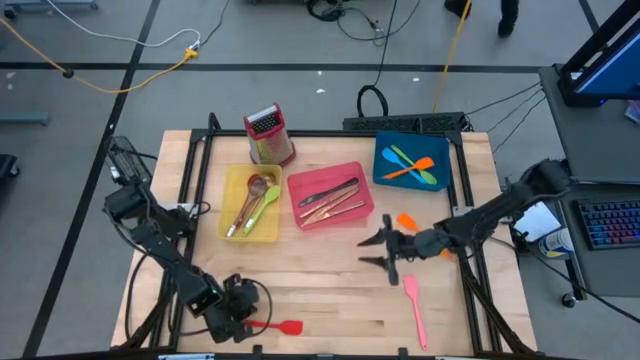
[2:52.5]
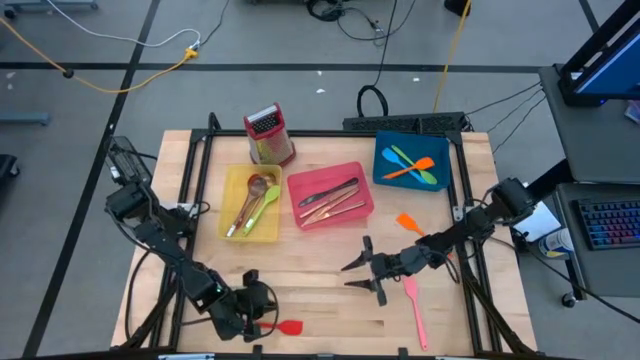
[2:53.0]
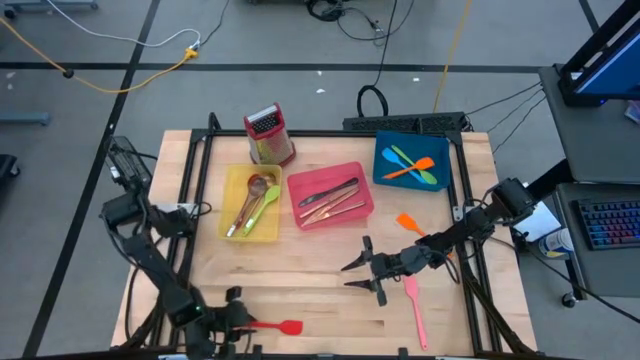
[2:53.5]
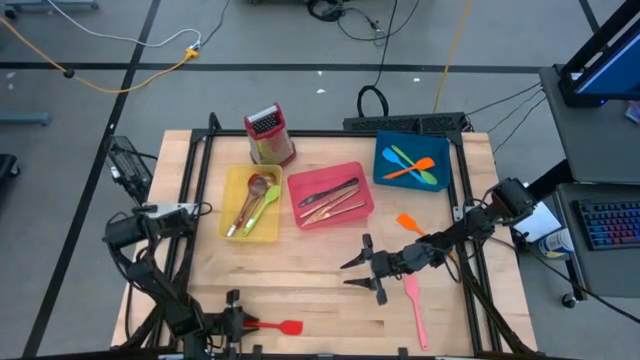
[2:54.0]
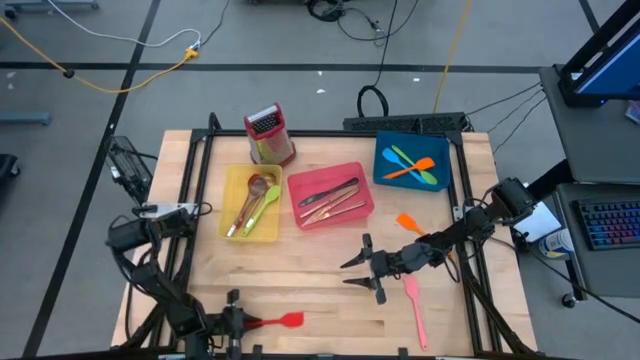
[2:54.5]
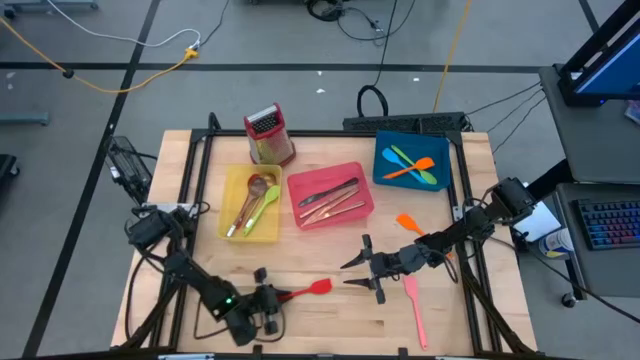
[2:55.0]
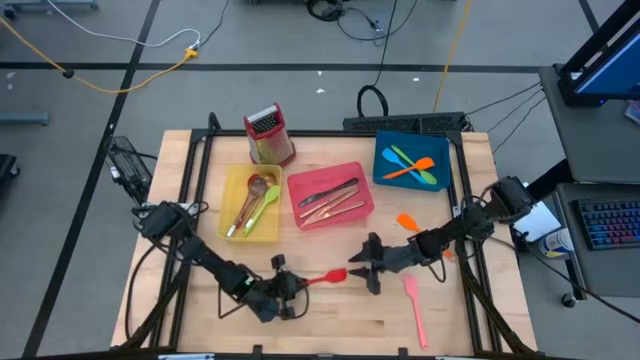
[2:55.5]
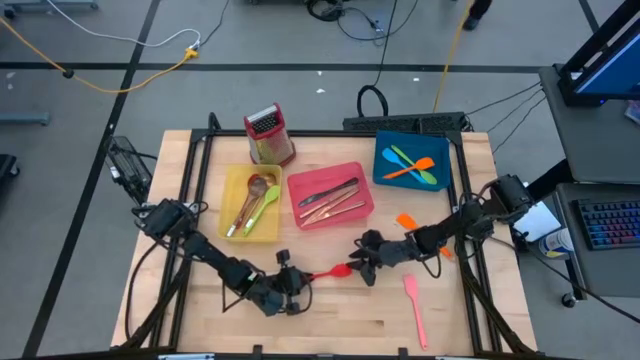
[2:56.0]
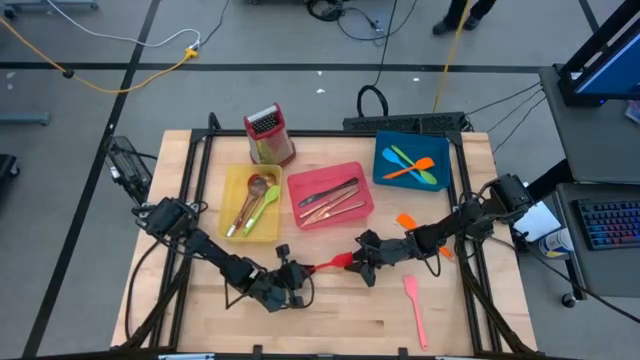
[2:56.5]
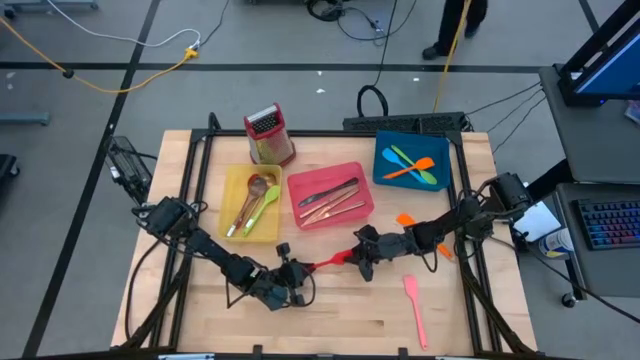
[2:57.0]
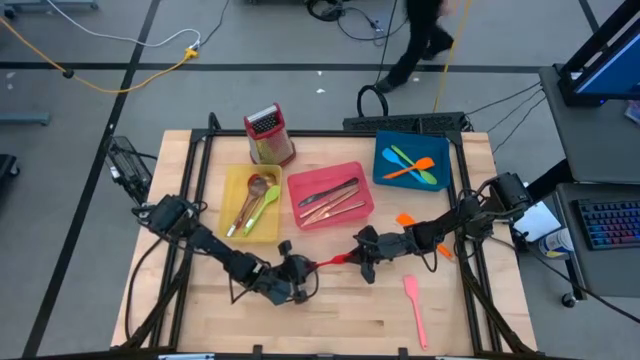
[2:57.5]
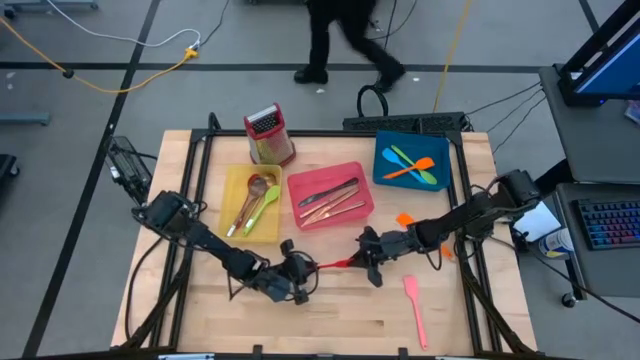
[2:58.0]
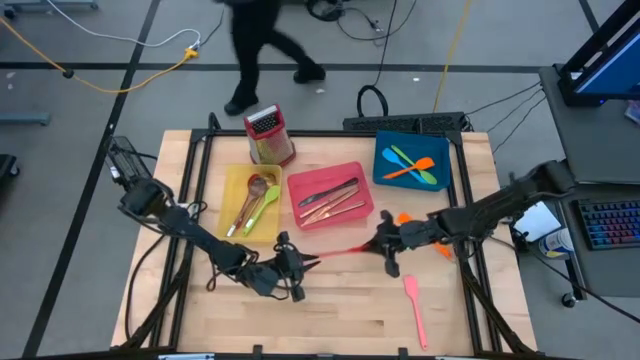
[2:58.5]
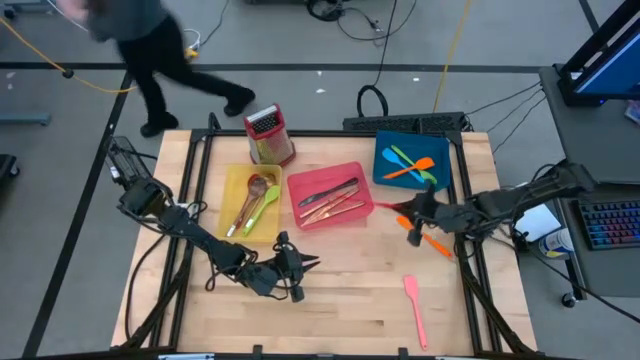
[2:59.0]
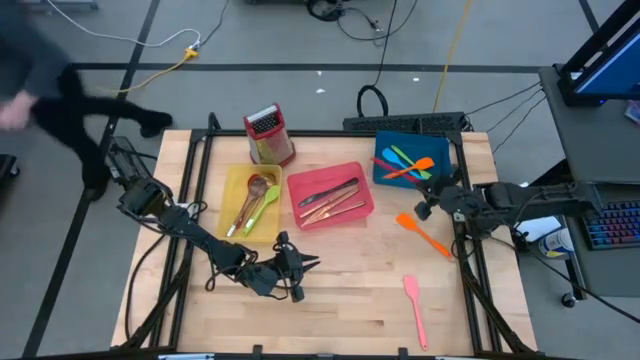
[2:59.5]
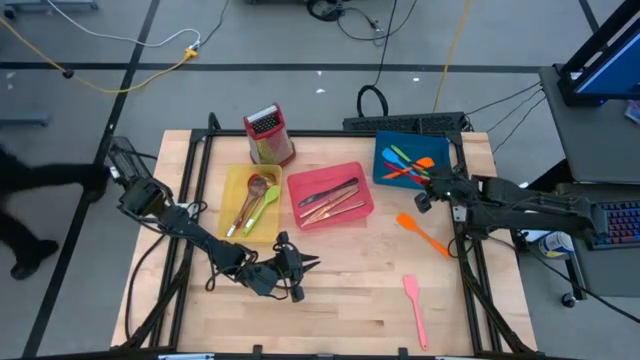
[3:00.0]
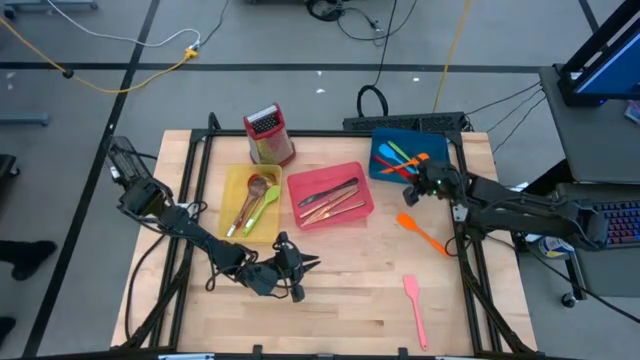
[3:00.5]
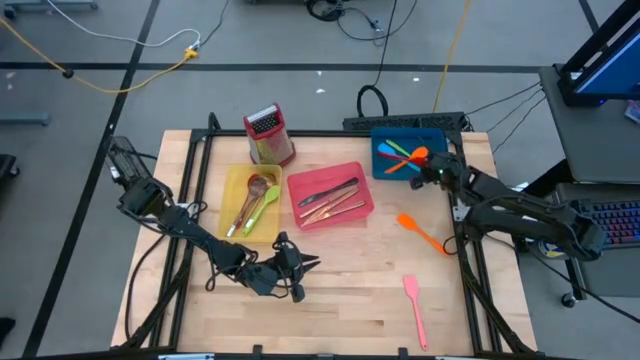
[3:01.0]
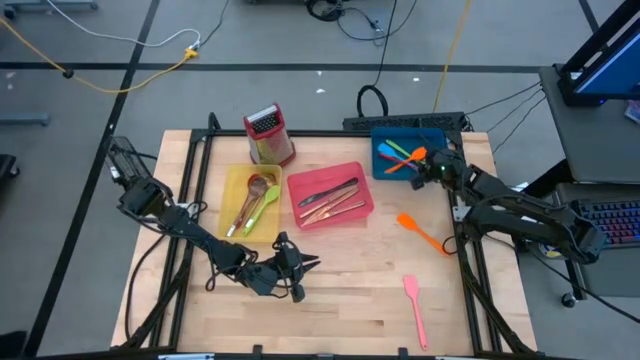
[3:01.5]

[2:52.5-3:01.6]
Task: Pick & Place Kitchen Items
Put the red spatula into the blue bin

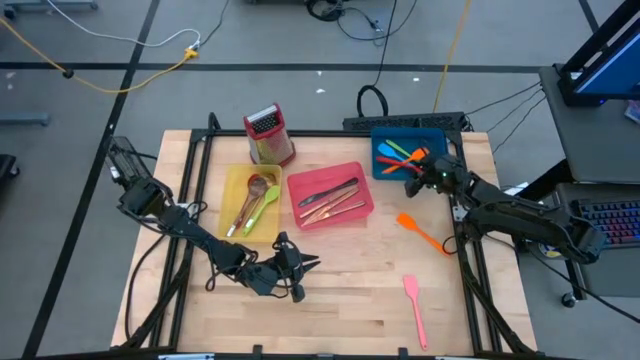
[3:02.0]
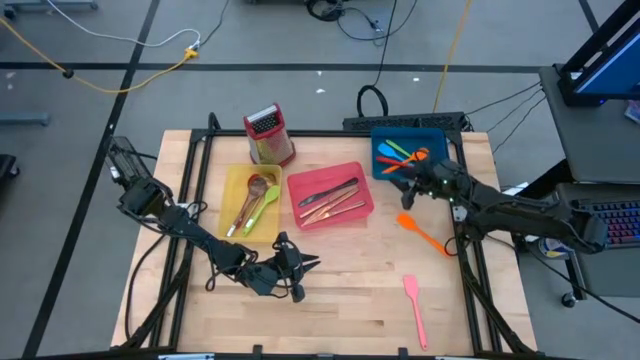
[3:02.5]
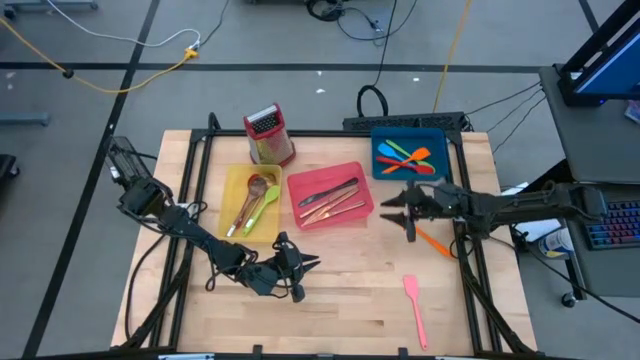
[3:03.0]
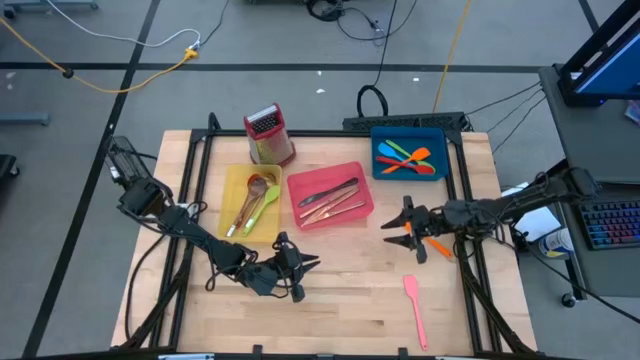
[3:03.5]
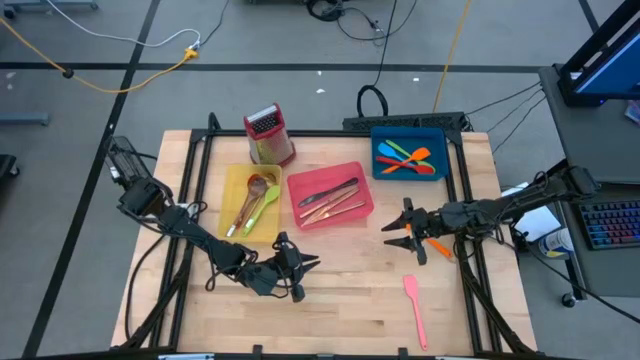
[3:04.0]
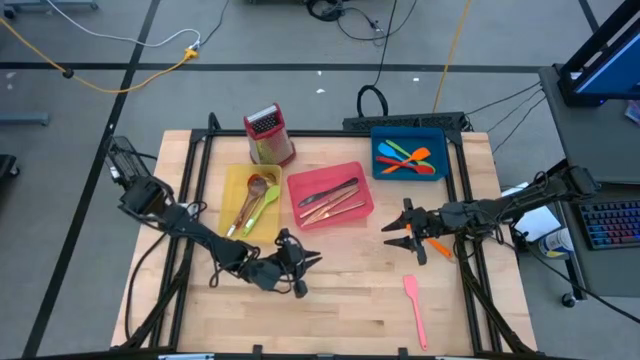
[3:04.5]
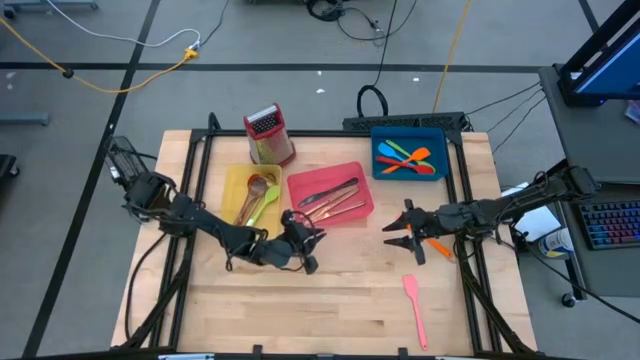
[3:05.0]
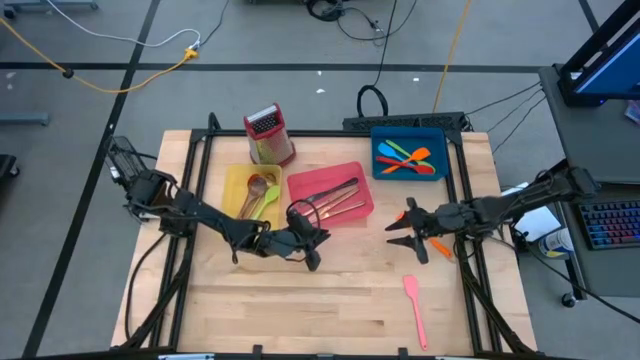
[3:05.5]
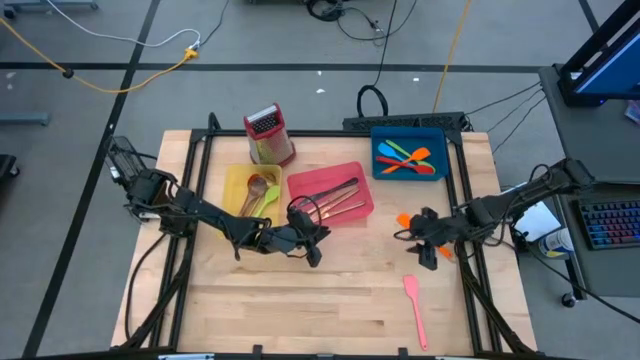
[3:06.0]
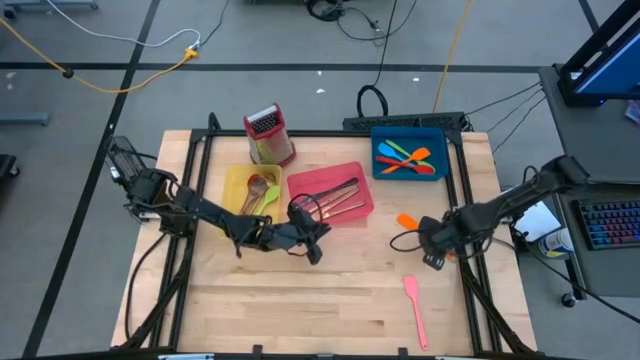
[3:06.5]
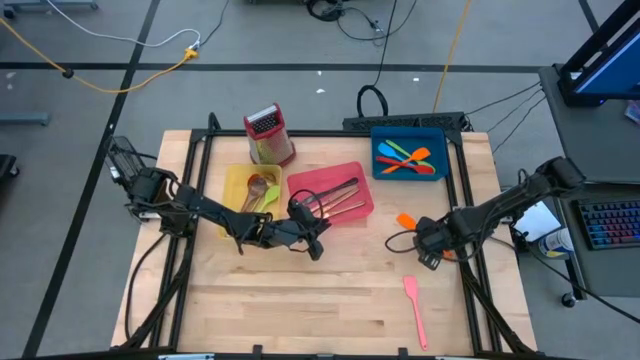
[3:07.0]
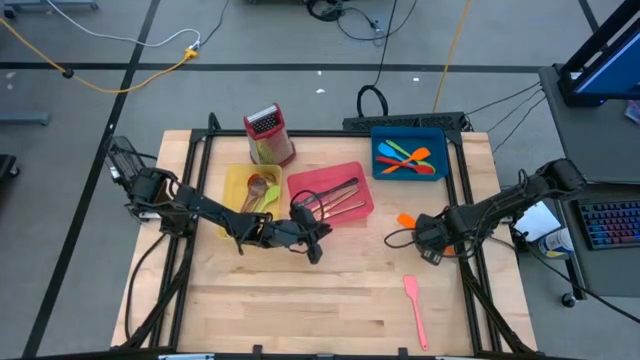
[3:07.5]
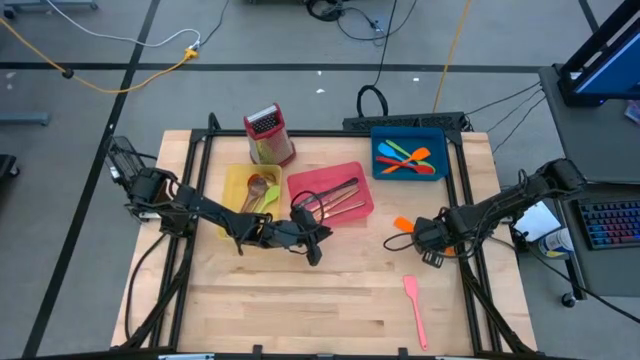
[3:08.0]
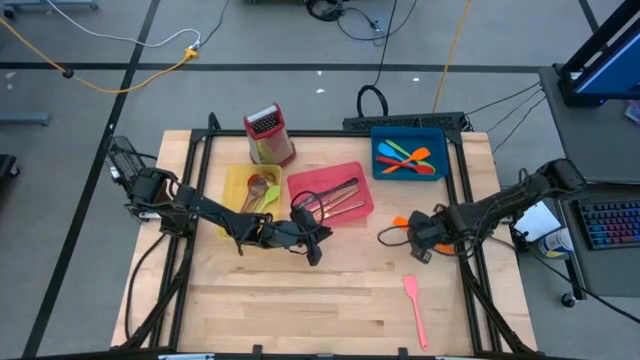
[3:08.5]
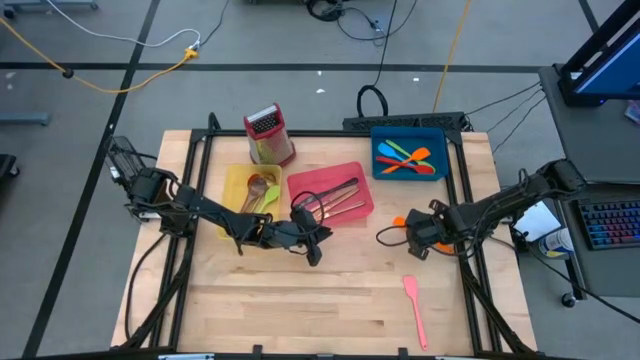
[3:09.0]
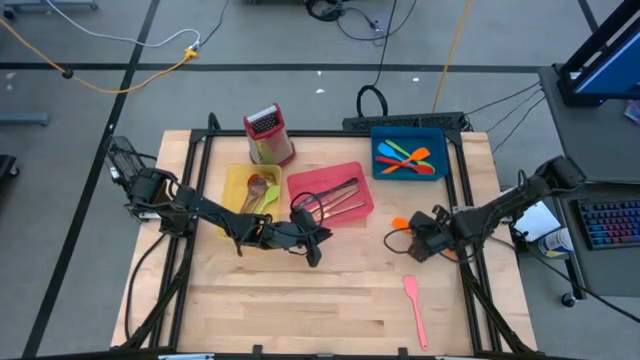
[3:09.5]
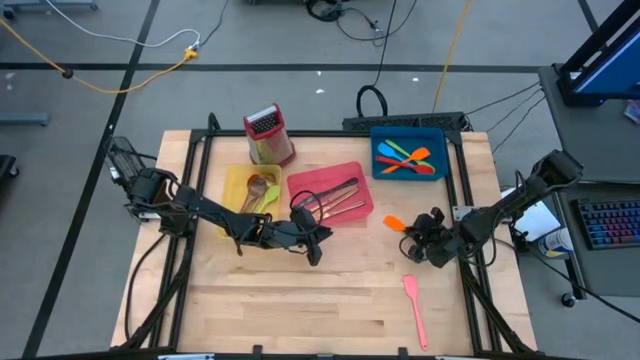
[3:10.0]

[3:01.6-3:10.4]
Put the orange spatula into the blue bin

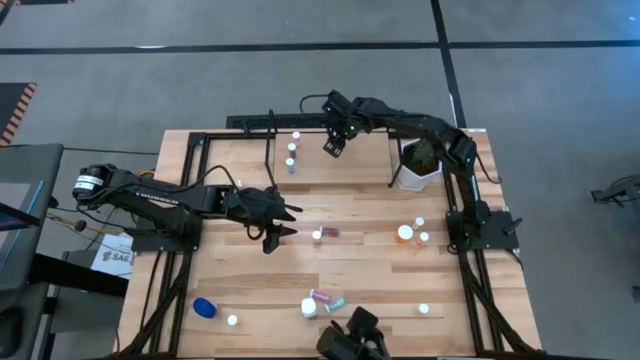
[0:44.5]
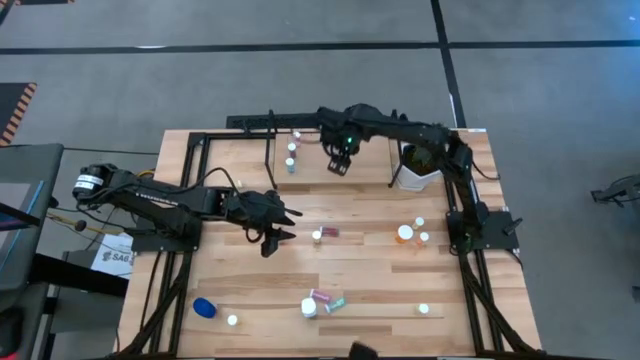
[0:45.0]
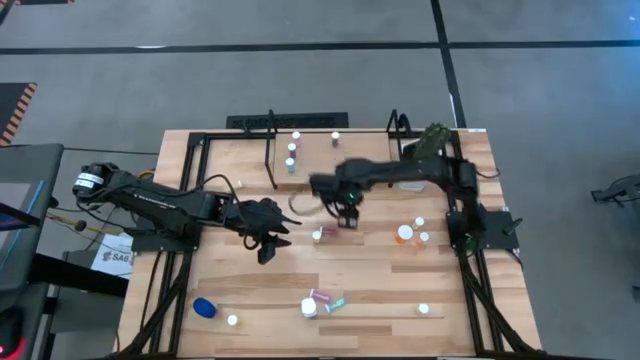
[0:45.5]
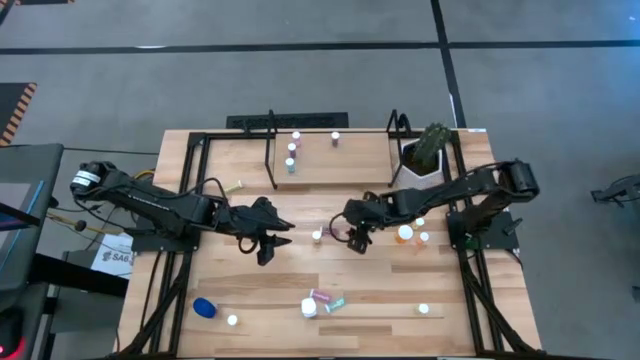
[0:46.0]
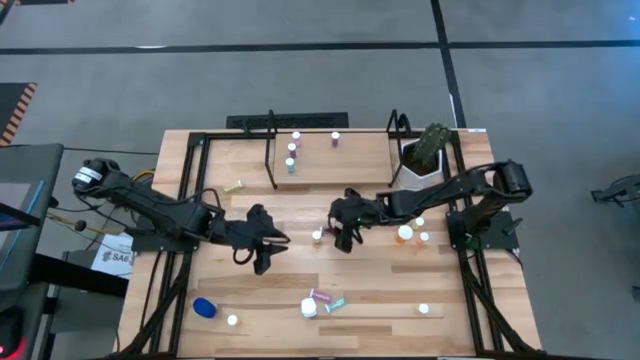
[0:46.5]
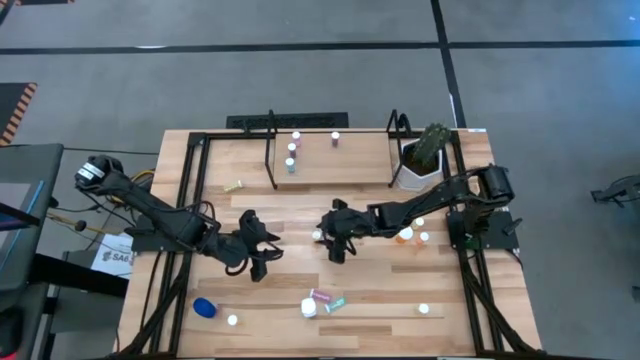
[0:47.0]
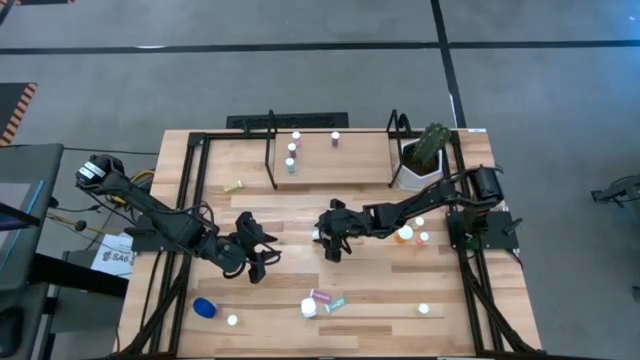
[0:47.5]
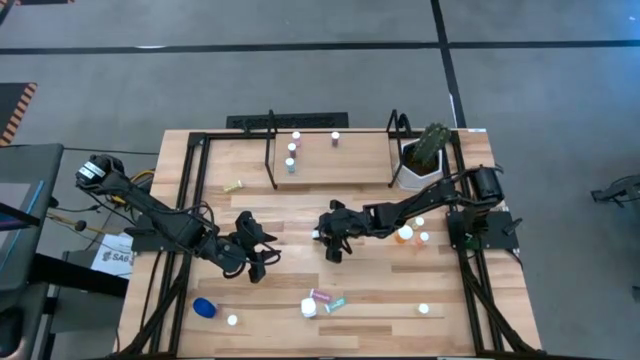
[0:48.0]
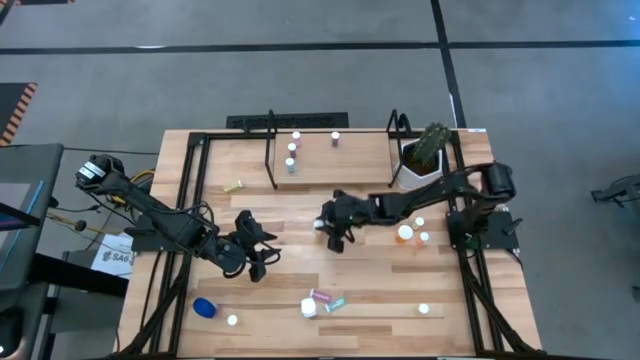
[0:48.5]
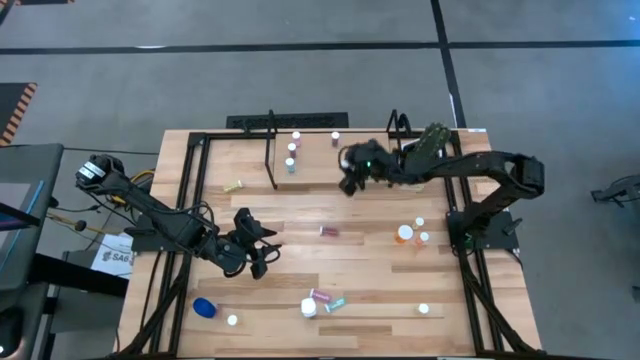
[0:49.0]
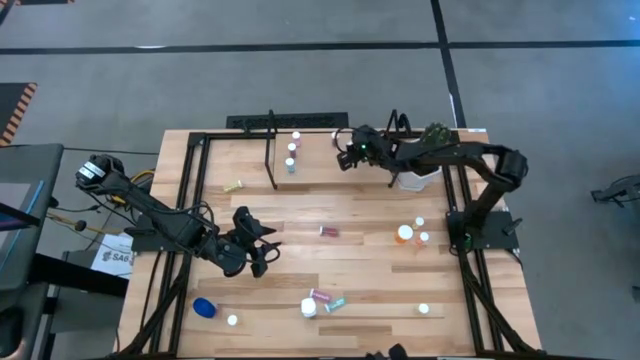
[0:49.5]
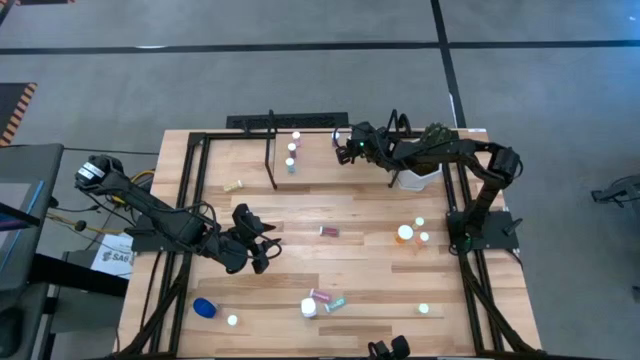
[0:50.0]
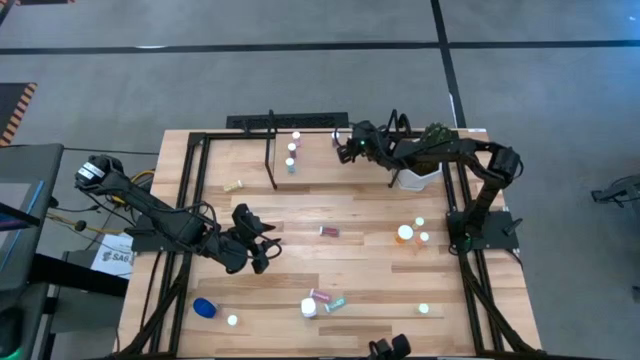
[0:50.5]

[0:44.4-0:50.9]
Task: Pick and place medicine bottles onto shelf by color
Put the yellow pill bottle on the shelf
